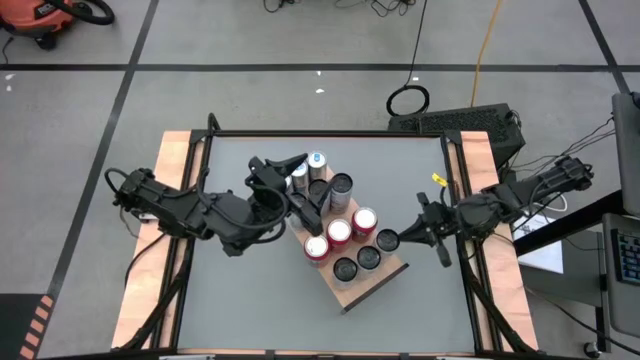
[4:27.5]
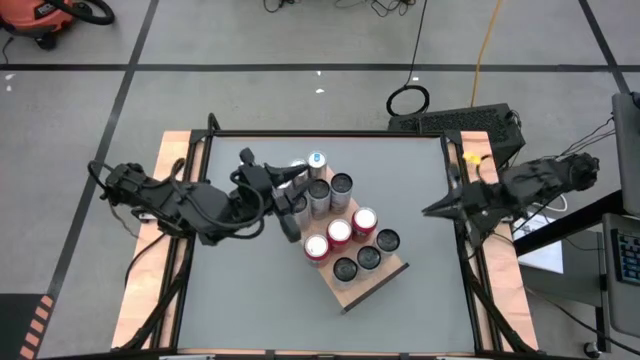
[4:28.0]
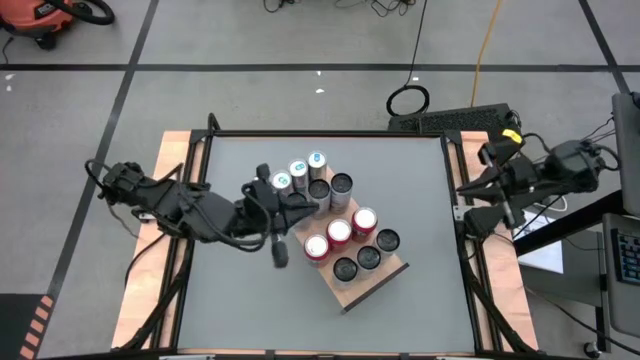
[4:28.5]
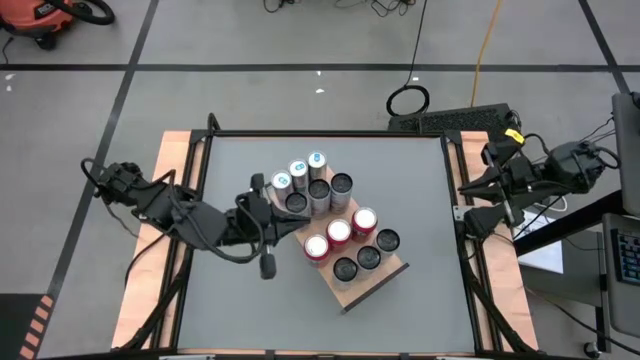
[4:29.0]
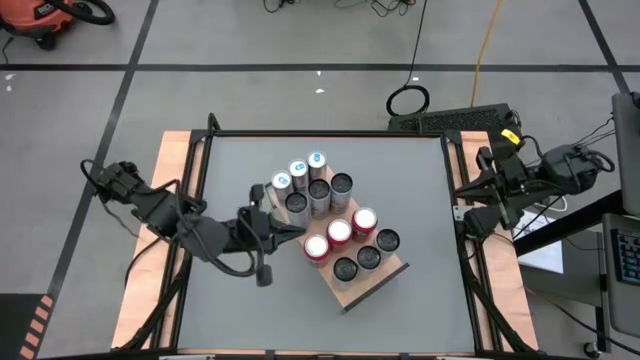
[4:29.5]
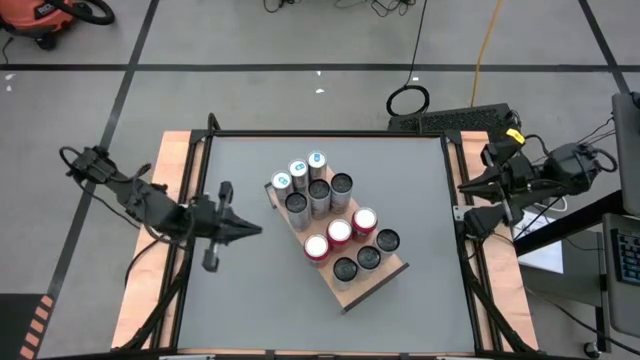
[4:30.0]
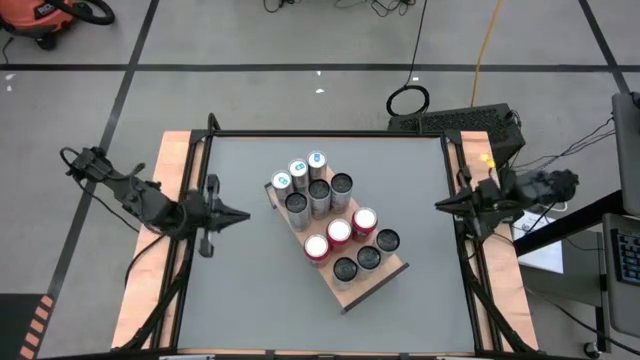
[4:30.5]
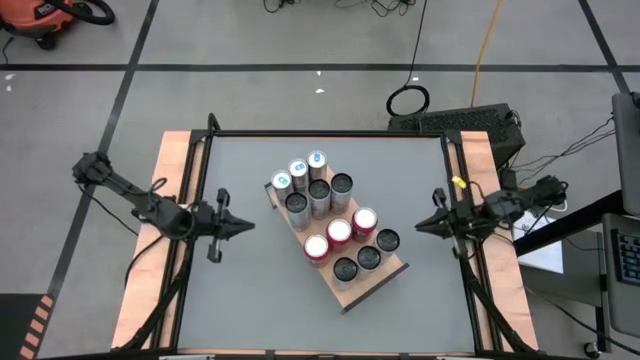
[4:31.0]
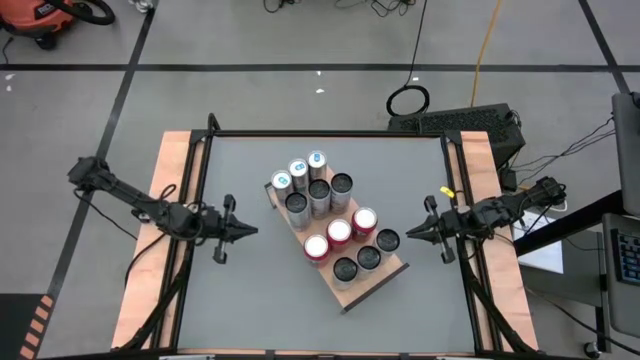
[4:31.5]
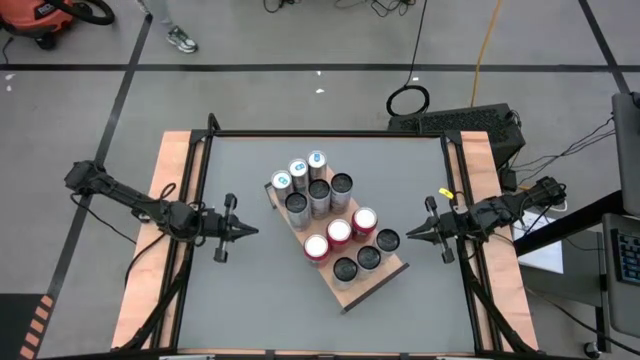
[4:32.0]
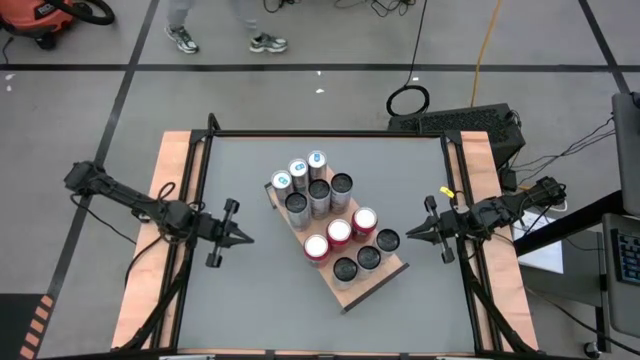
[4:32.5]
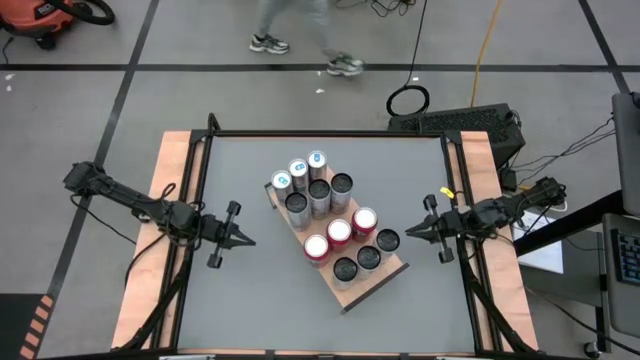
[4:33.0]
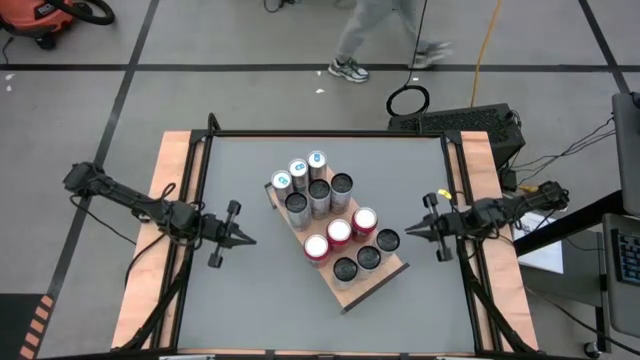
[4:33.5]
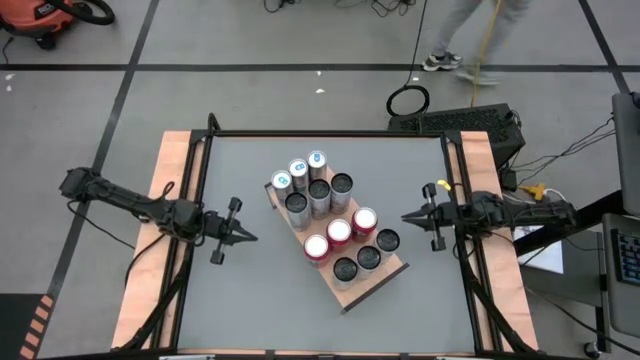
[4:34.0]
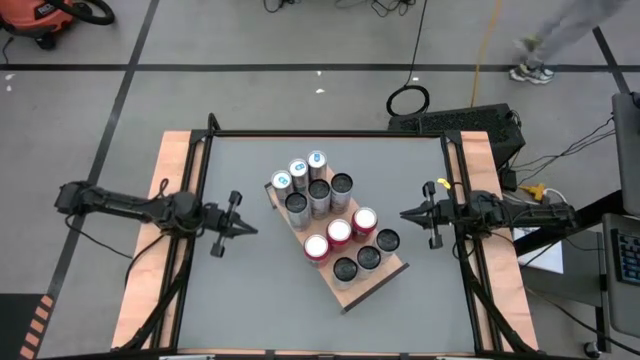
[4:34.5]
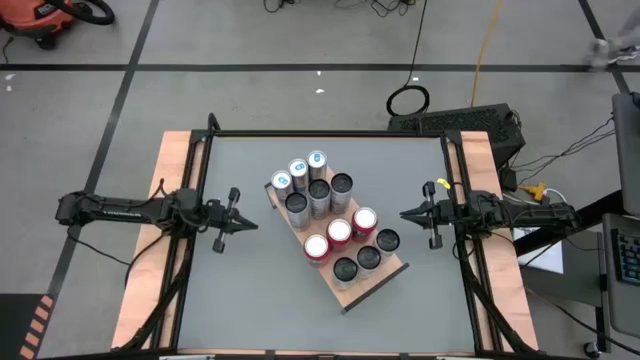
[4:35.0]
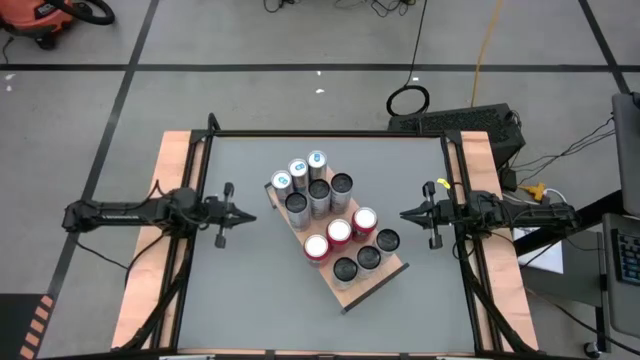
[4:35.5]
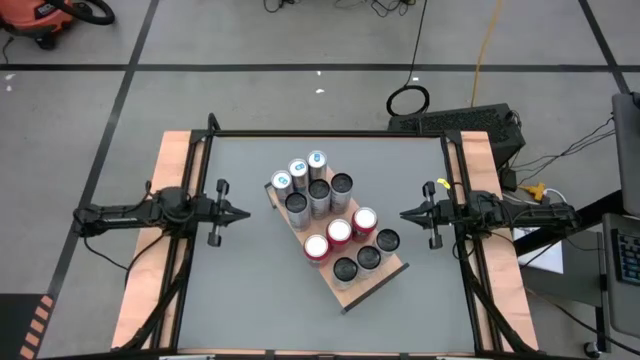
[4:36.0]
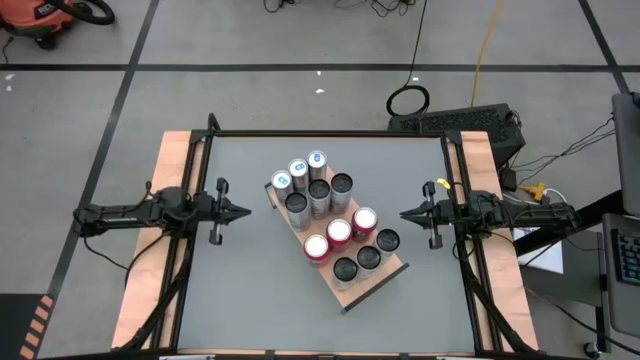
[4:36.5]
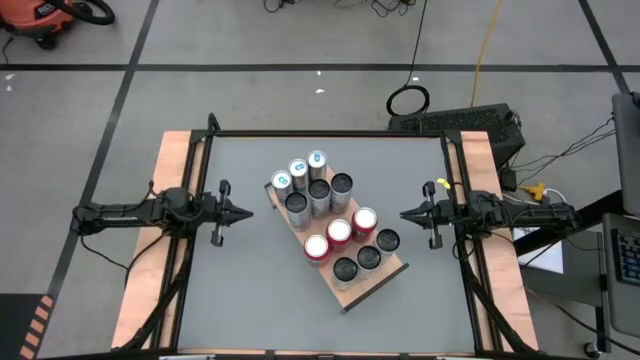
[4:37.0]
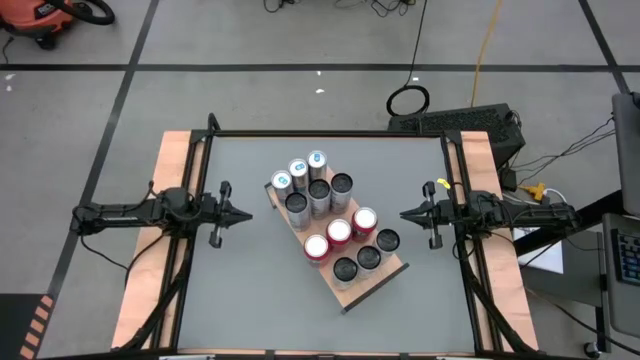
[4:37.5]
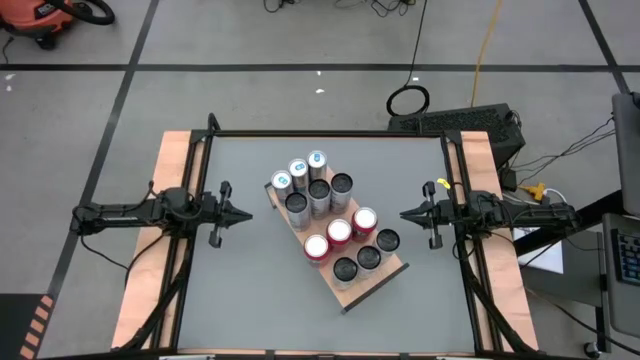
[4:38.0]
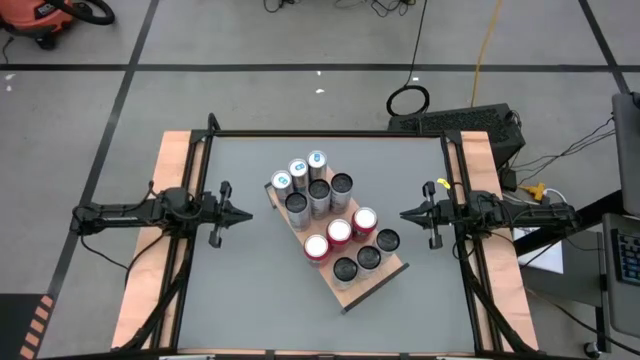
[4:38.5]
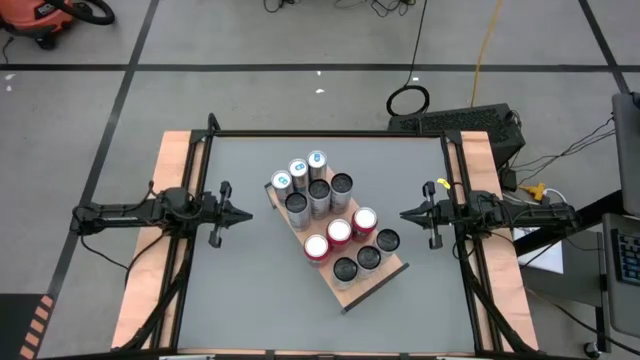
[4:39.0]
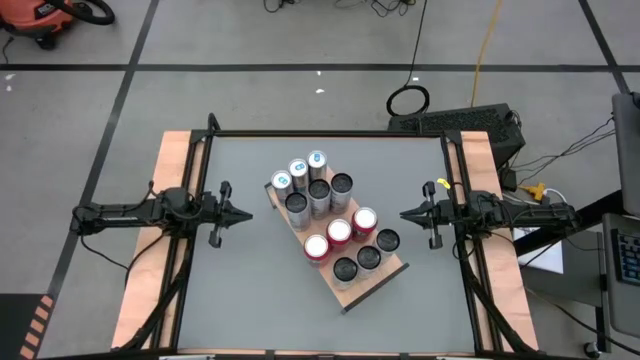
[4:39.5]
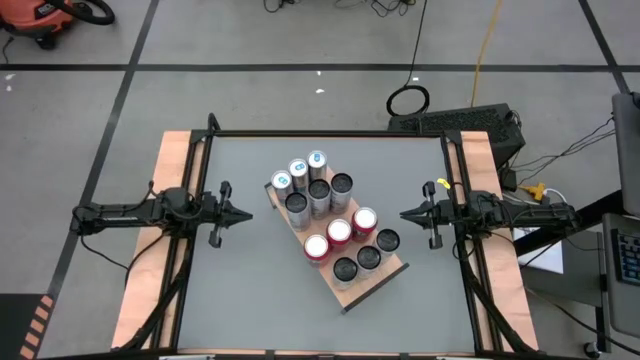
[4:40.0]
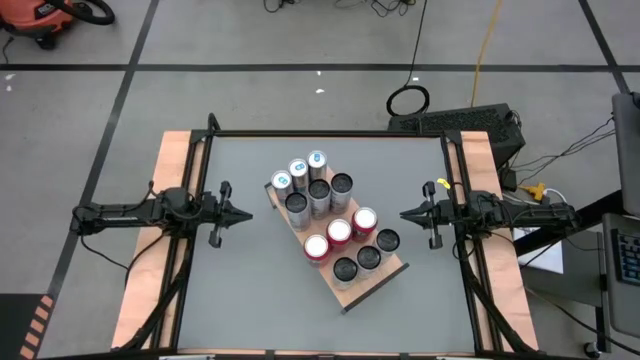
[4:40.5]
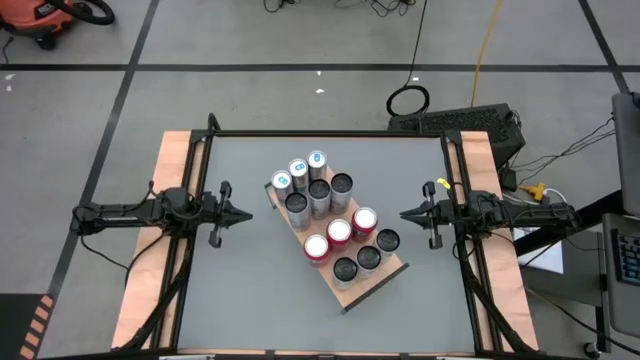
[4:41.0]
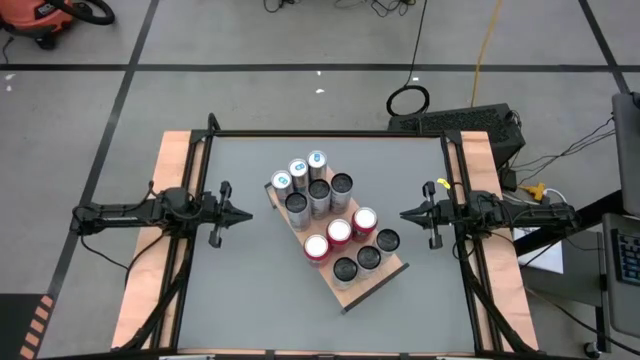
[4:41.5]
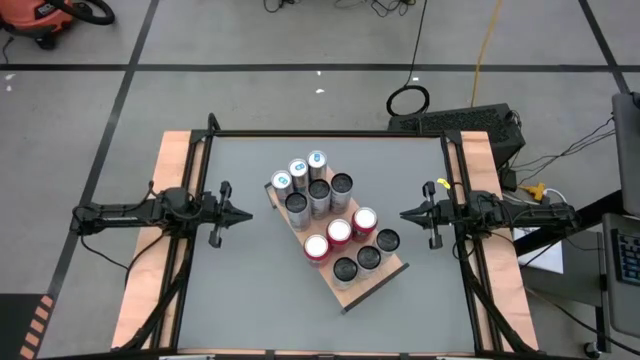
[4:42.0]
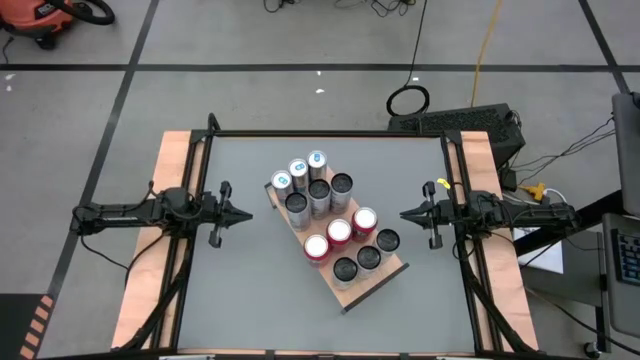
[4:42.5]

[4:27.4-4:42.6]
Task: Place canned beverage on shelf
Return to Home Position

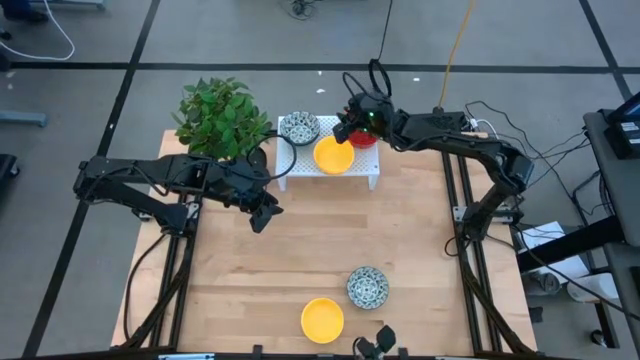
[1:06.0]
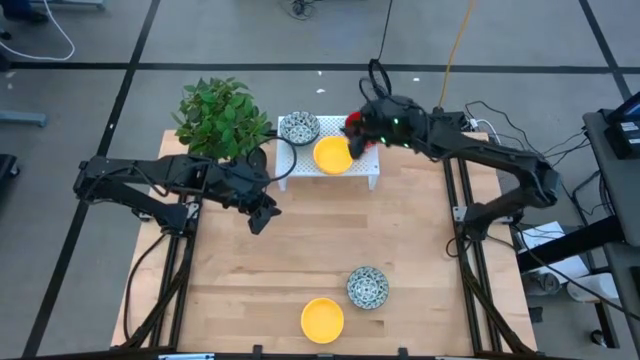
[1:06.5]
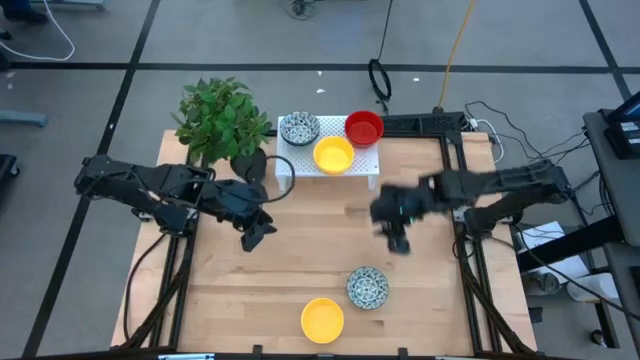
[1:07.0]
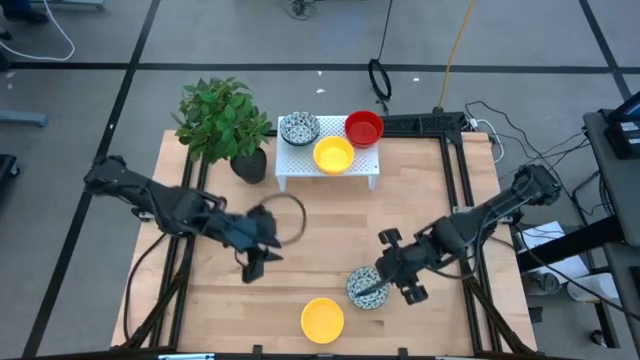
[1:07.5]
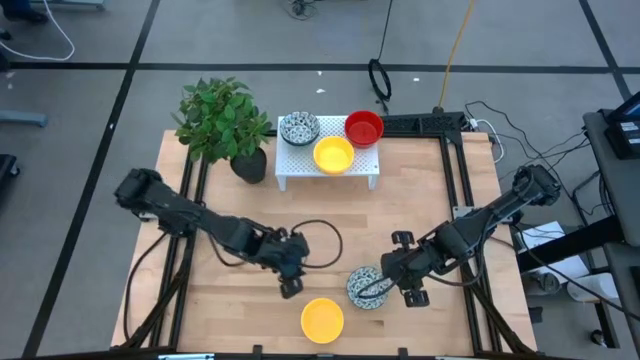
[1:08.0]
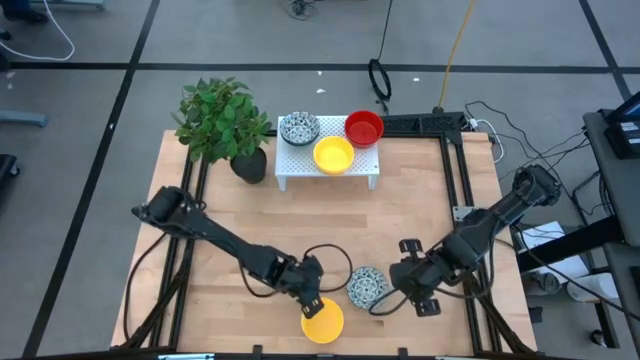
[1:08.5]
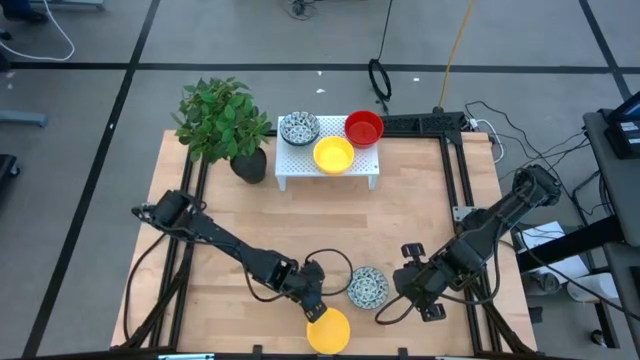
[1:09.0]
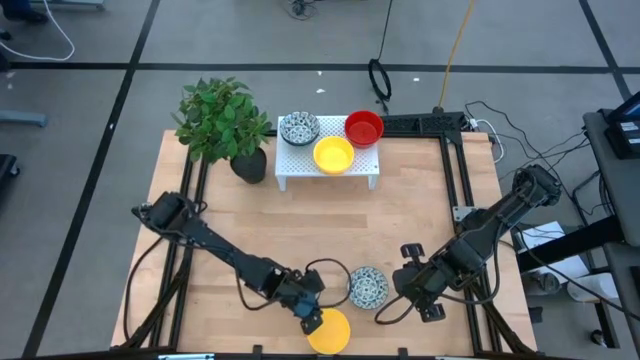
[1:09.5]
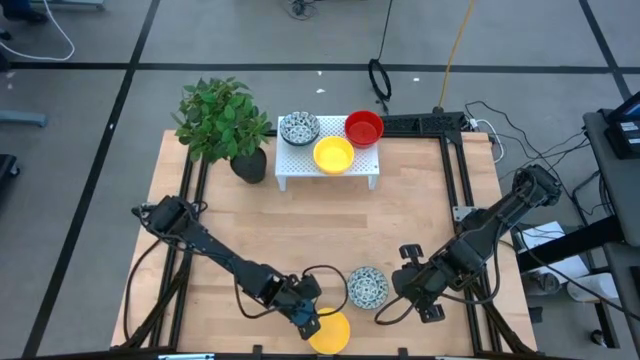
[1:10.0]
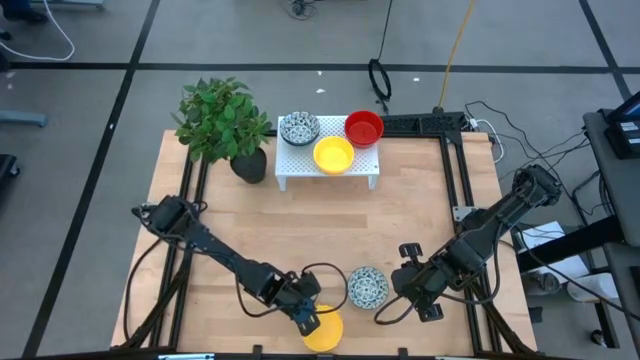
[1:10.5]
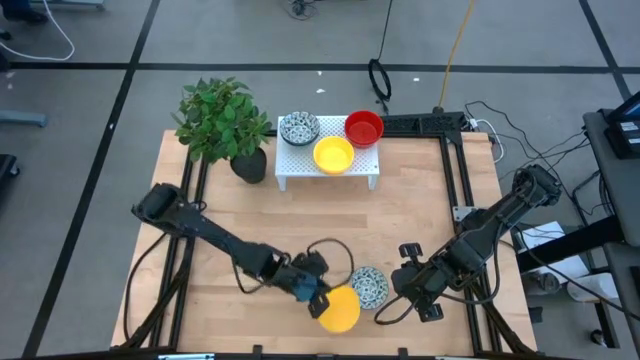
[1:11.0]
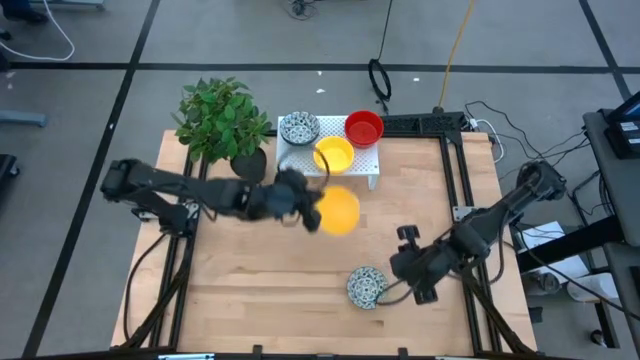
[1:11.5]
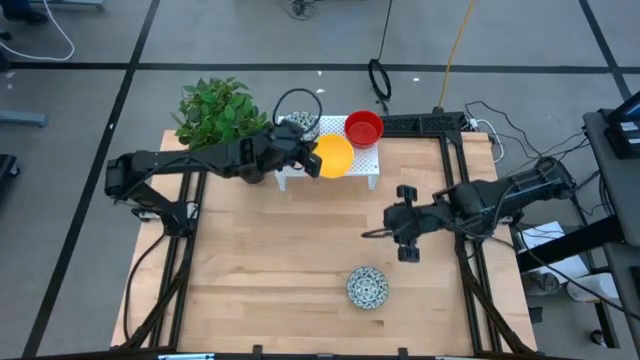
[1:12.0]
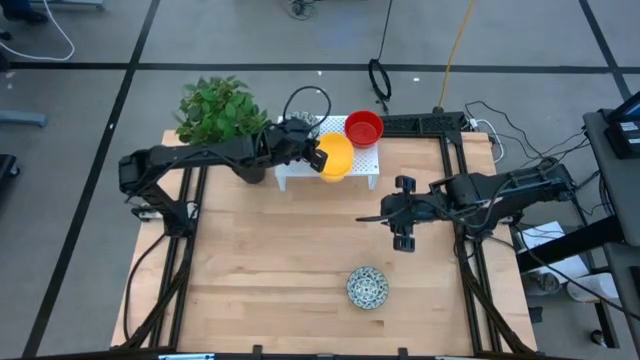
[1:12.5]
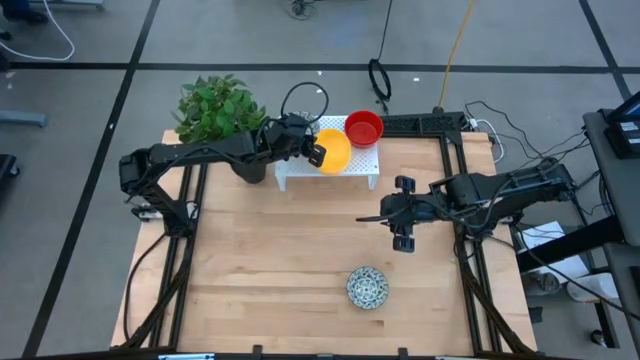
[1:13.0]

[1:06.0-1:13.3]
Task: Pick & Place Mini bowls
Stack the yellow bowl on top of the yellow bowl on the shelf
